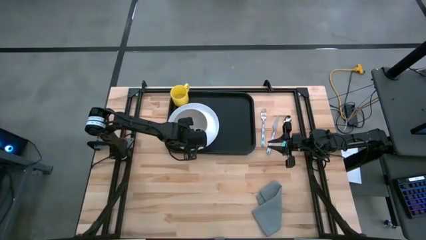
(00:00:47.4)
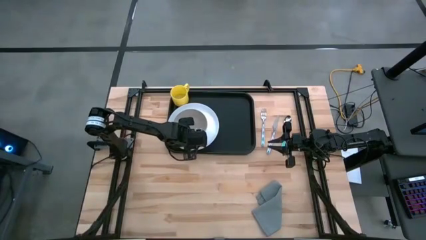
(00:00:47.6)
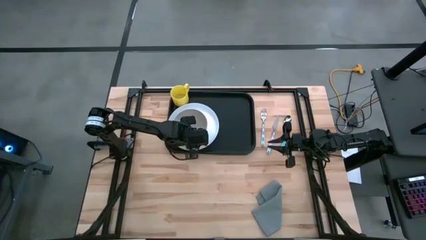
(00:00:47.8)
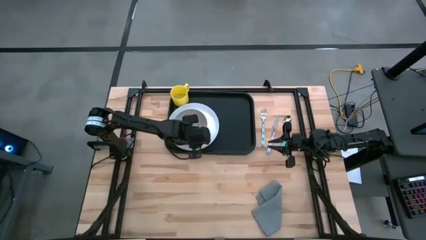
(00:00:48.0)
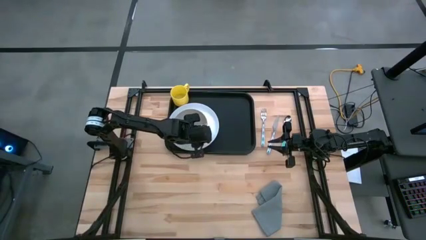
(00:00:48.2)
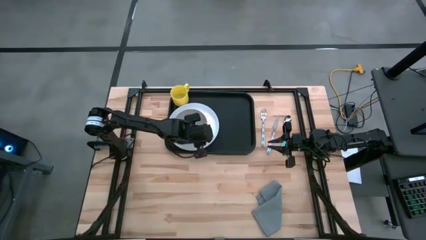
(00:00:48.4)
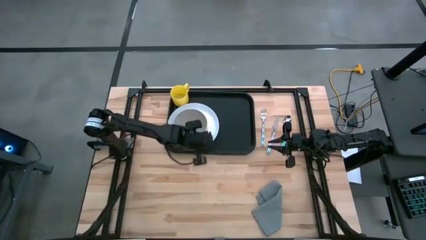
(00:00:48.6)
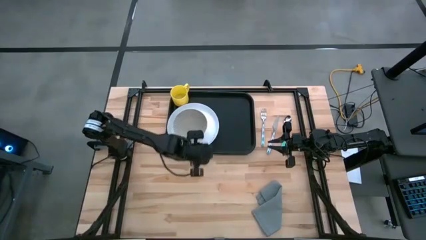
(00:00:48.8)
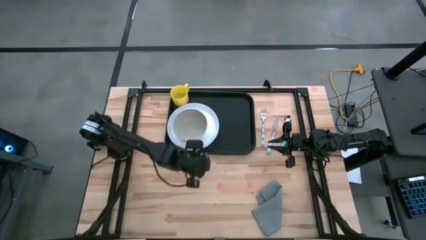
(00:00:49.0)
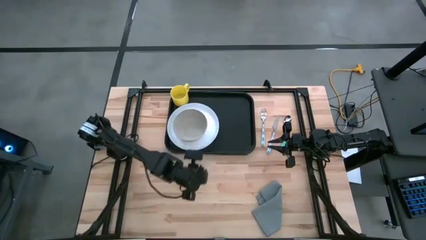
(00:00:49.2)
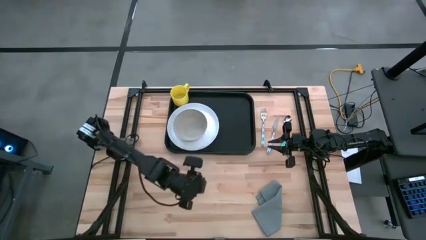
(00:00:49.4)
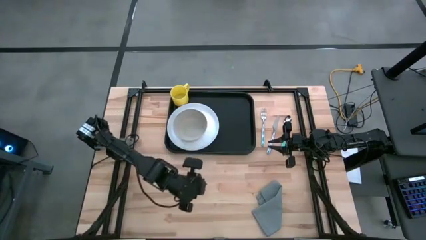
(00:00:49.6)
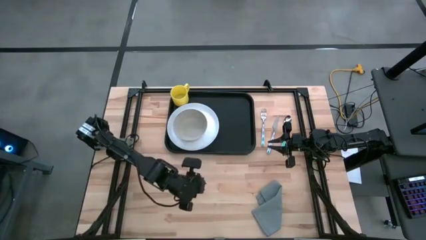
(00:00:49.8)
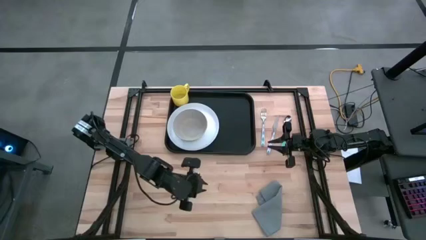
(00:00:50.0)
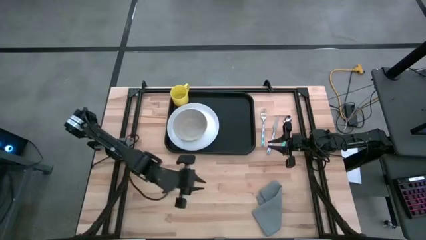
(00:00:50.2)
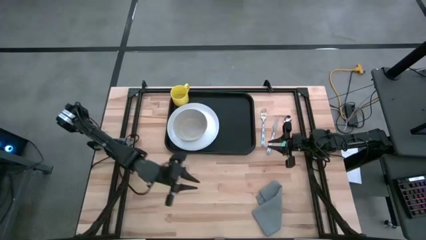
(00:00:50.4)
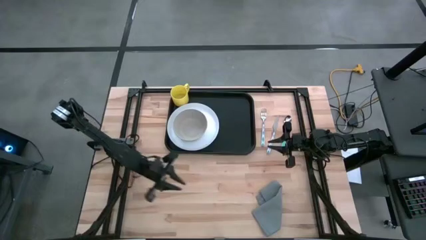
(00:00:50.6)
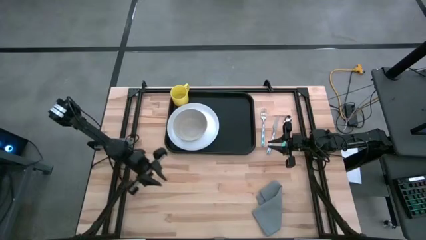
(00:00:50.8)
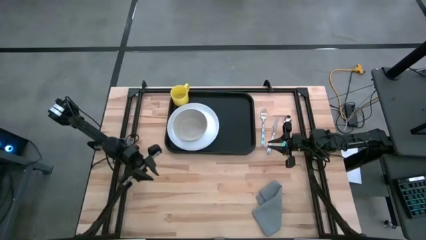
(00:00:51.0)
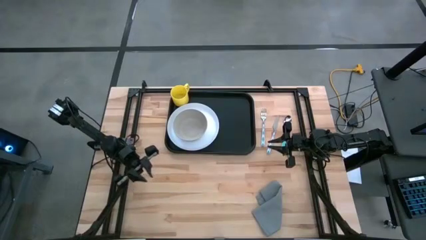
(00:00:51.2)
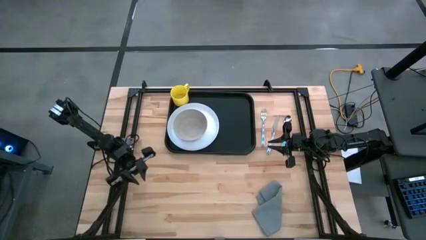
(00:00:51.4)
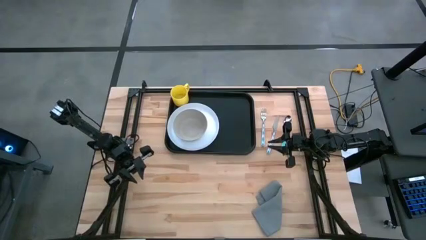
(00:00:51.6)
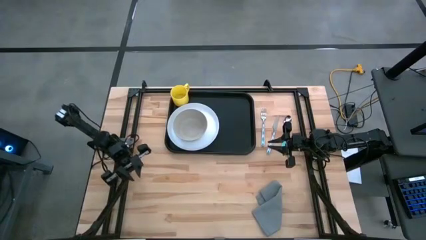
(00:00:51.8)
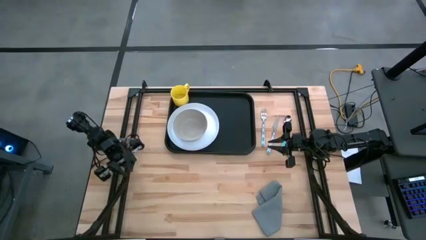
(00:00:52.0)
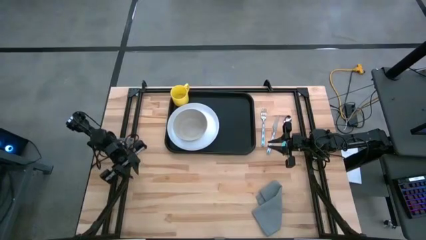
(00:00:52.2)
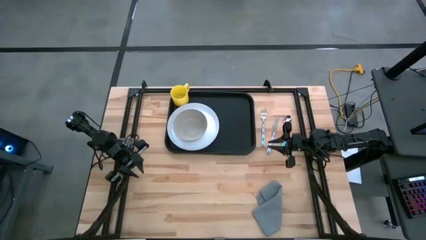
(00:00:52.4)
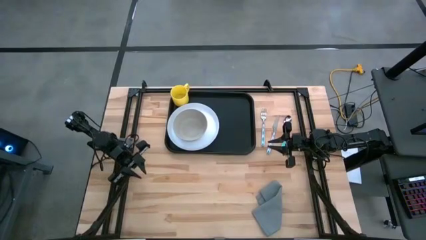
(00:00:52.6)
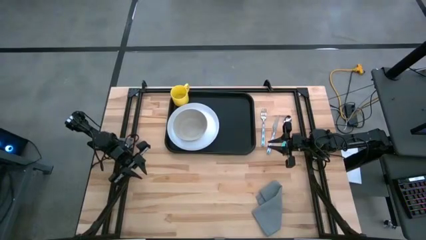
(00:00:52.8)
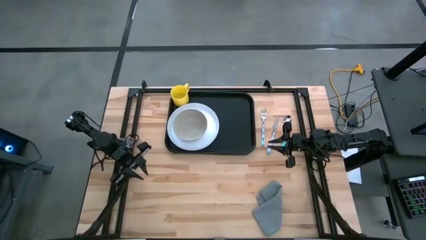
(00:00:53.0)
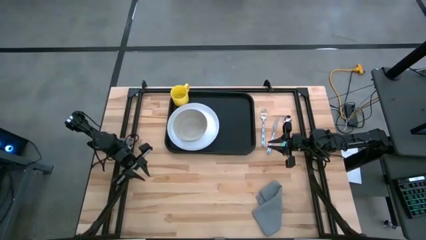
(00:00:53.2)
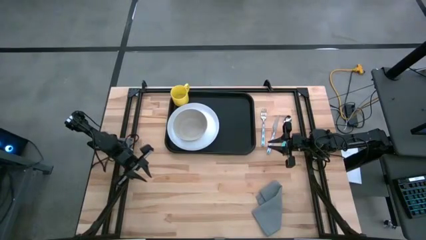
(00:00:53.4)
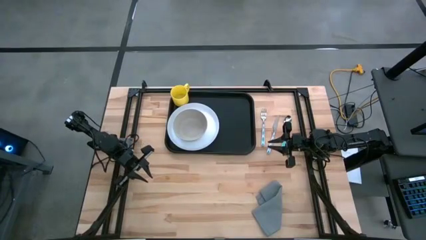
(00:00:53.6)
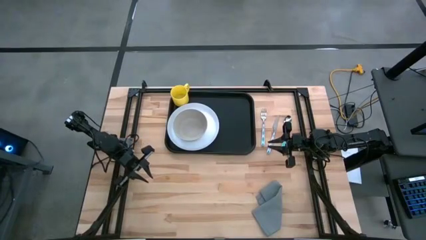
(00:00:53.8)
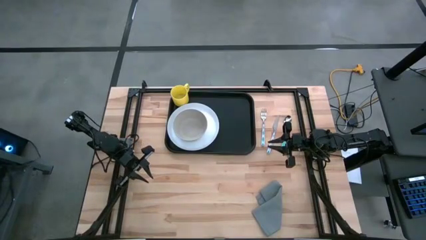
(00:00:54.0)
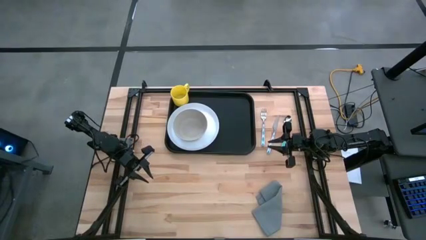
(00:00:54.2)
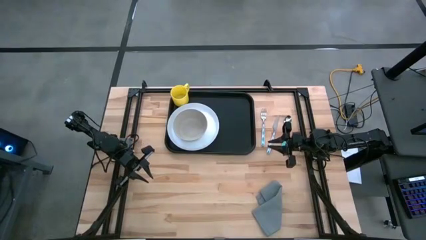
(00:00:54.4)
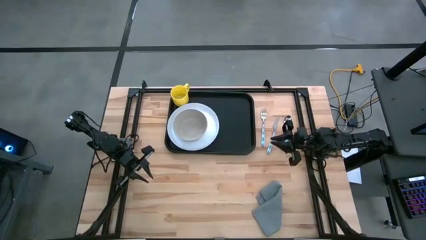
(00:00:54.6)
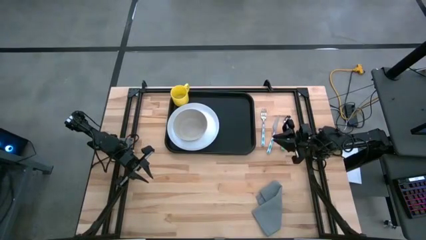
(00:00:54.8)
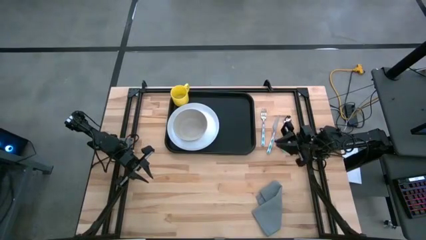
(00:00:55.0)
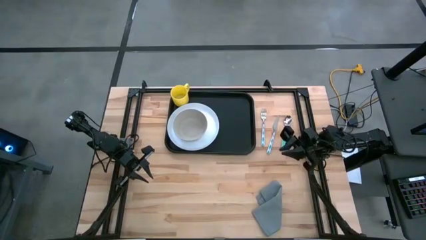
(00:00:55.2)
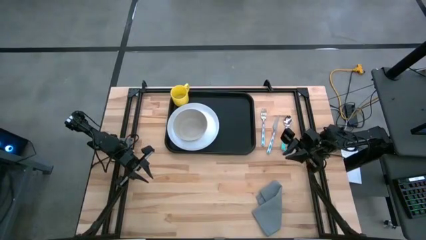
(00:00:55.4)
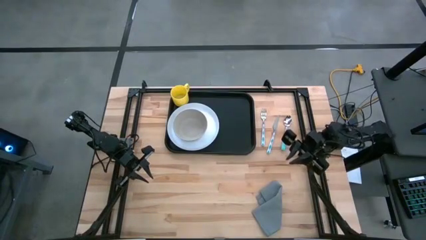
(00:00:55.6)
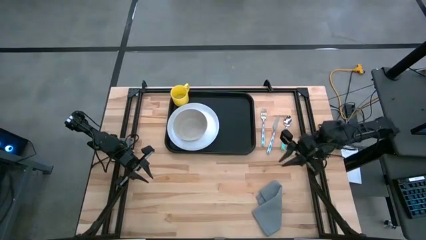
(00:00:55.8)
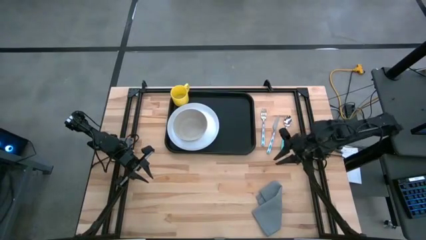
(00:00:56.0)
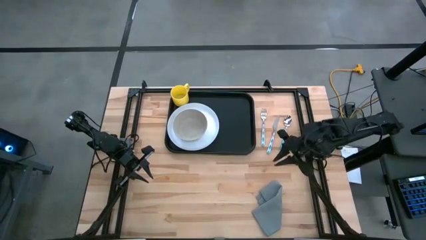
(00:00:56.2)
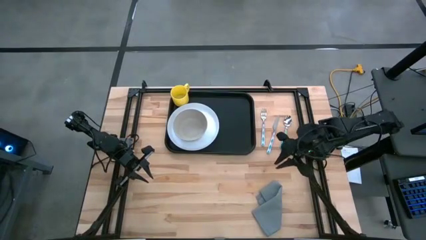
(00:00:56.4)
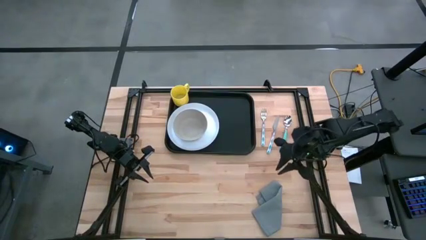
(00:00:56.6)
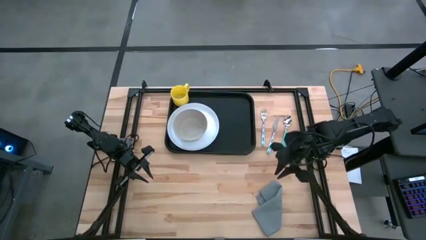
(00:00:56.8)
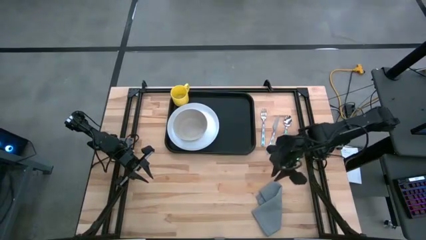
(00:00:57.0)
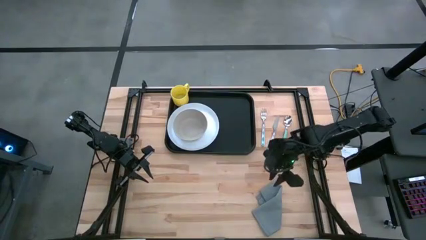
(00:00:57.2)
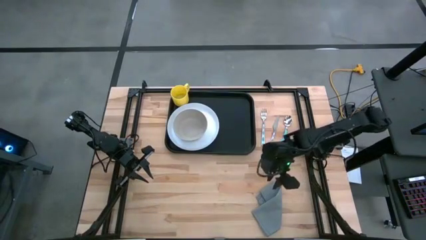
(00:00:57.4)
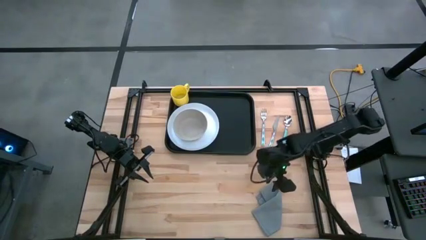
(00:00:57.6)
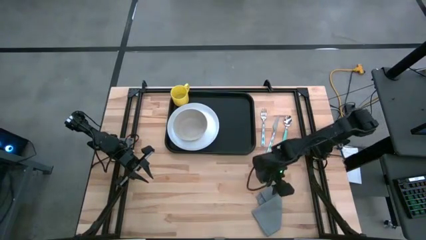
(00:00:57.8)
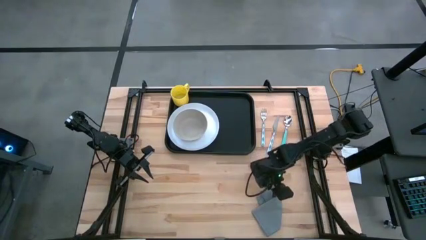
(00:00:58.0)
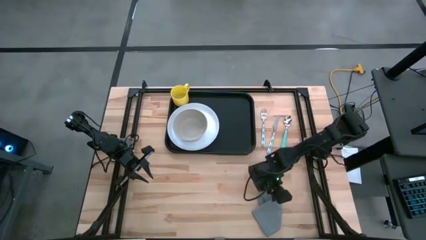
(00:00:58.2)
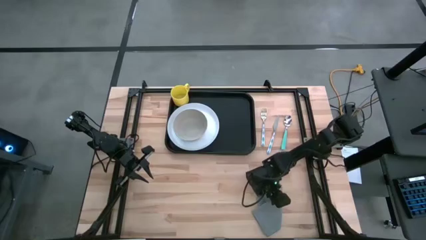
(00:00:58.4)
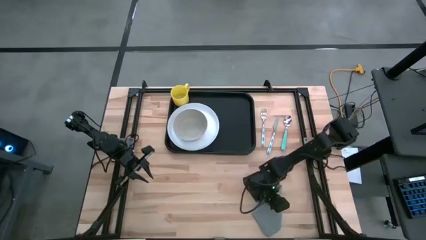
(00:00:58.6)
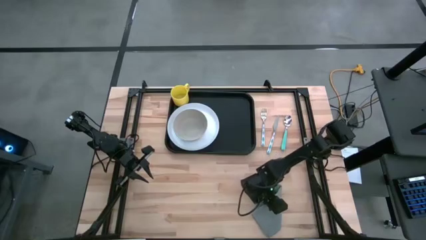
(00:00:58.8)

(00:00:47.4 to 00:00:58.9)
Task: Set up tray
Put the gray napkin to the right of the white plate on the black tray
